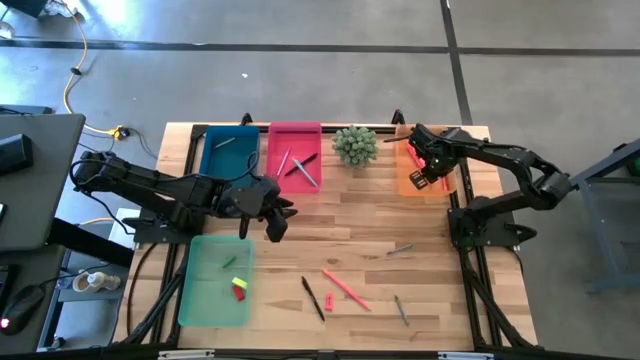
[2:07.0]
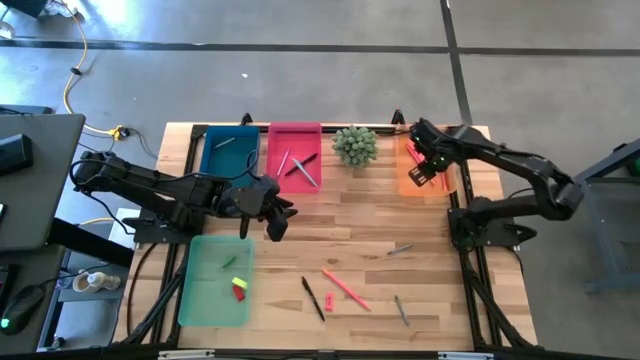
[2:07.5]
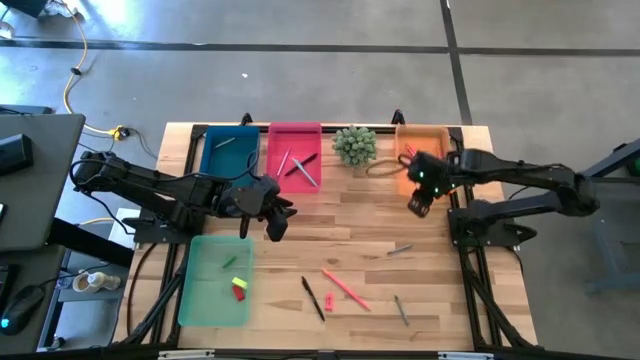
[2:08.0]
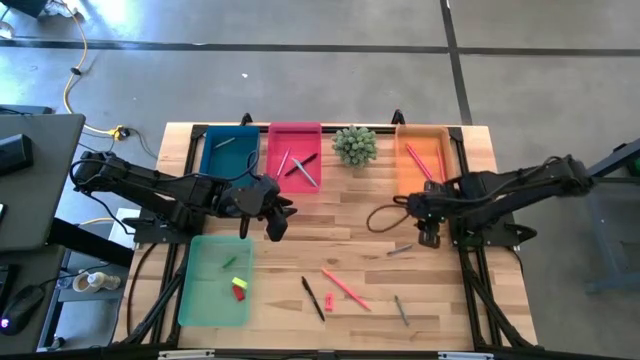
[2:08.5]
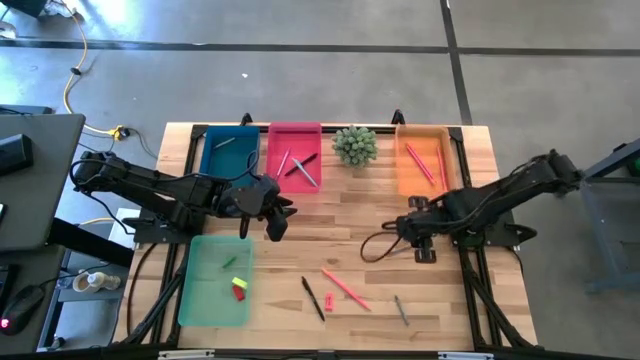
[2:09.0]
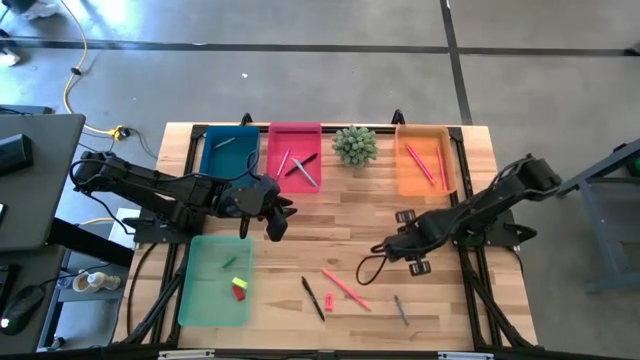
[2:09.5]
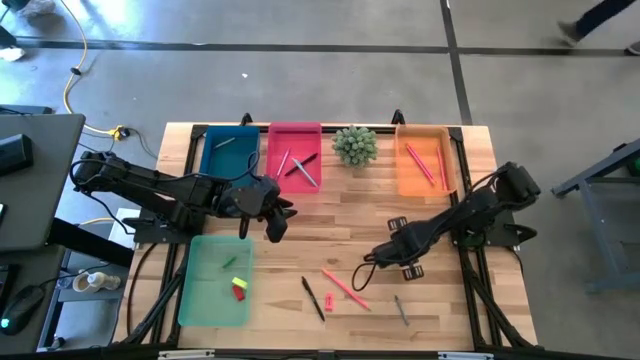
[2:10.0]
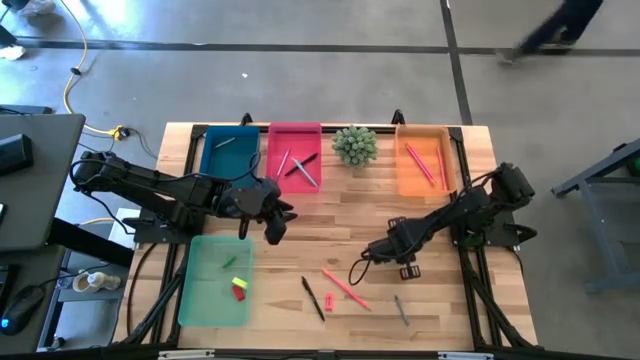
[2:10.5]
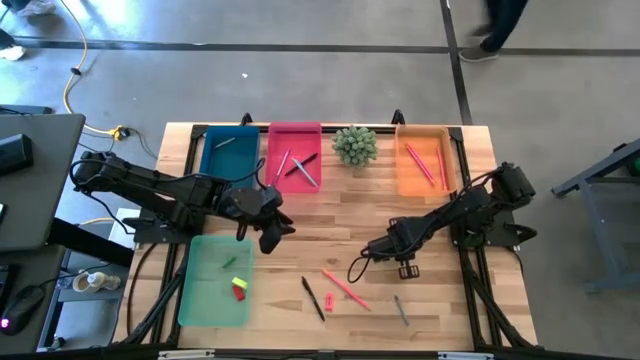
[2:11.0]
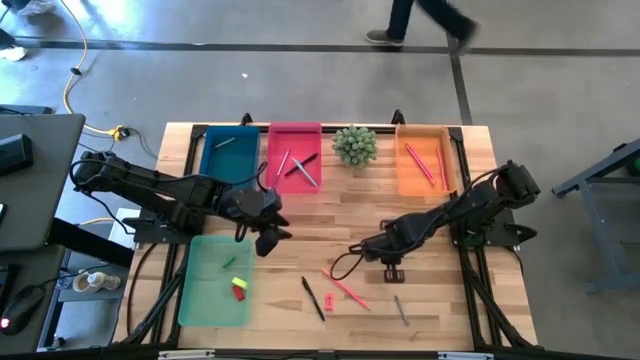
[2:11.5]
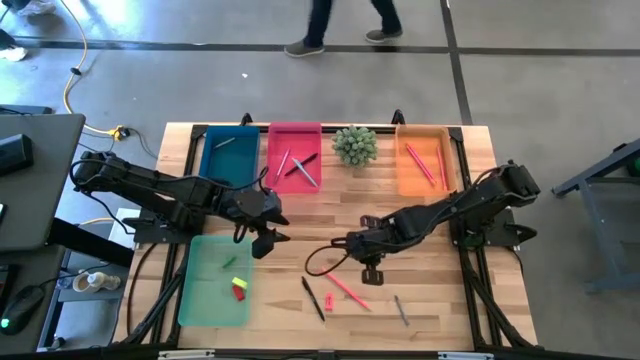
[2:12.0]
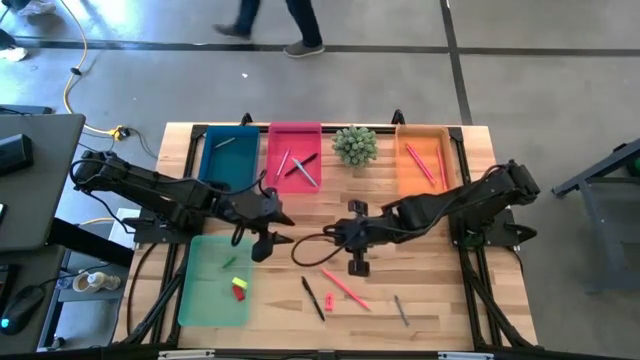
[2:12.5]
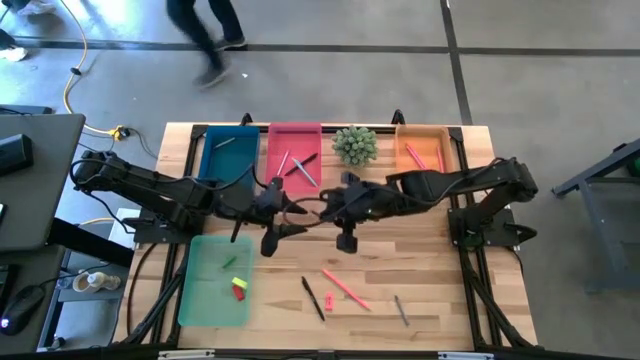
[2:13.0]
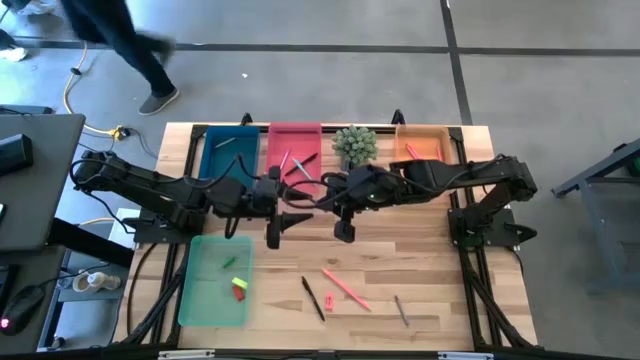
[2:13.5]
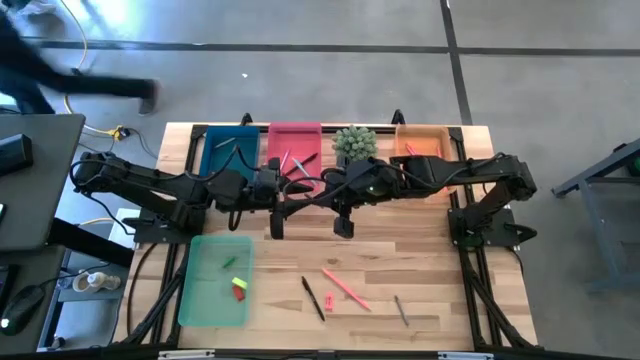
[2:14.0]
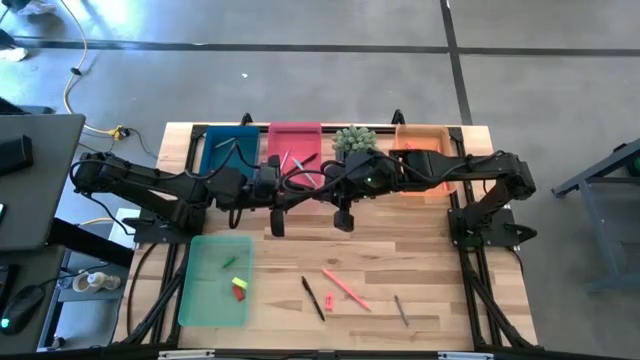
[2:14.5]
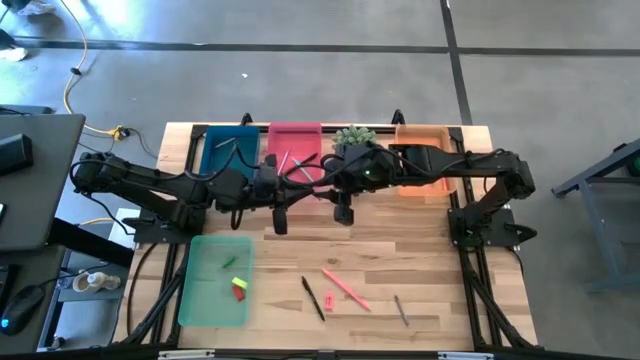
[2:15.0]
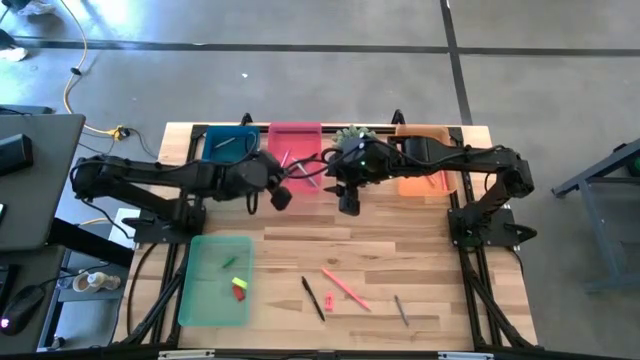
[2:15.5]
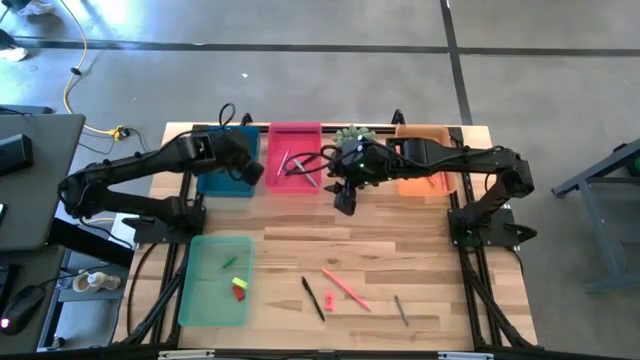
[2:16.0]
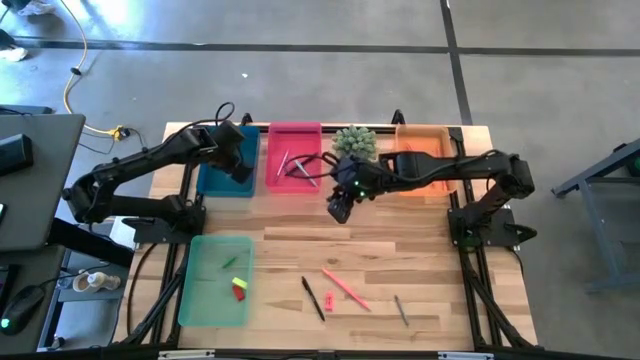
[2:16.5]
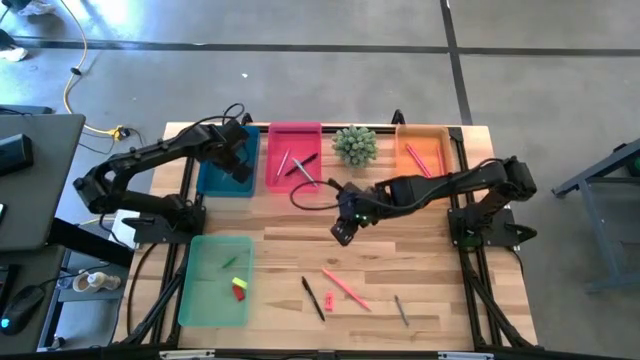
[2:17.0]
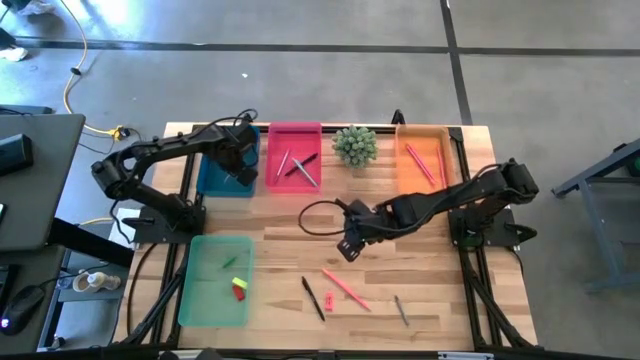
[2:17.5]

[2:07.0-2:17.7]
Task: Sort crayons/erasers/pens/pencils in bins
Put the gray crayon into the blue bin

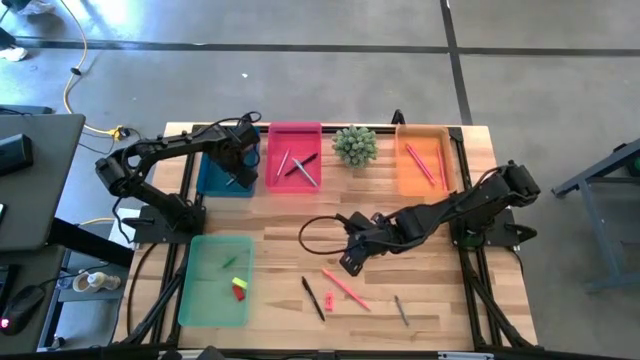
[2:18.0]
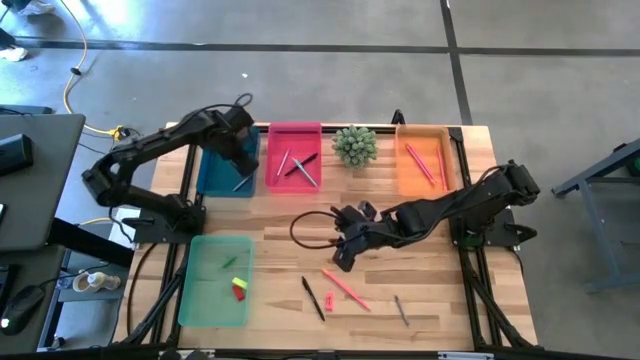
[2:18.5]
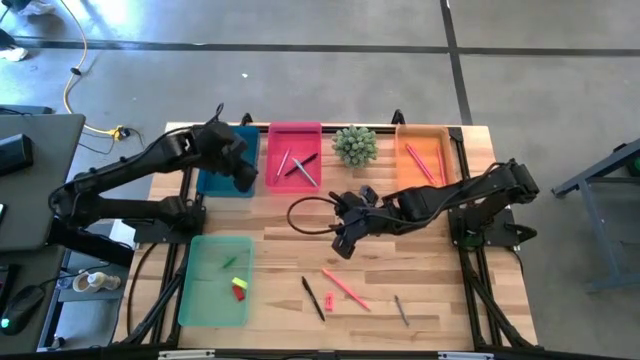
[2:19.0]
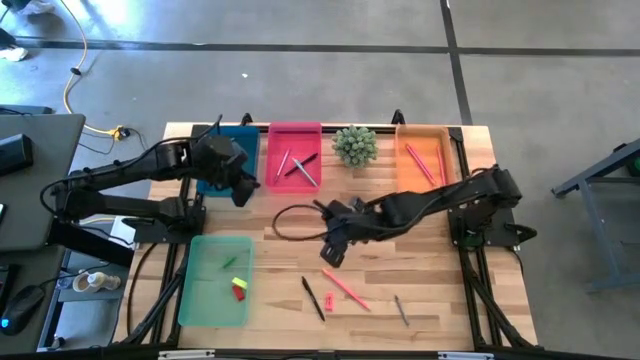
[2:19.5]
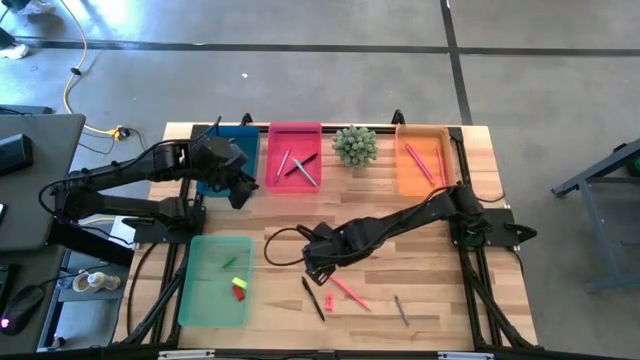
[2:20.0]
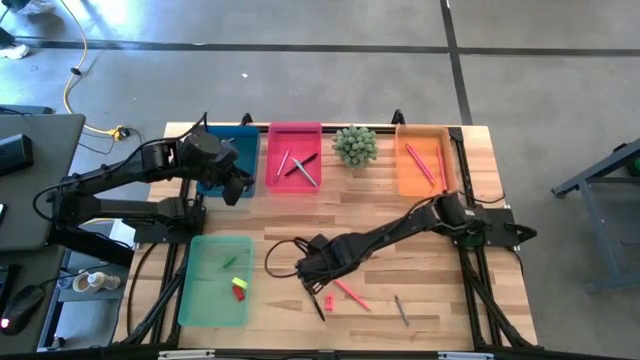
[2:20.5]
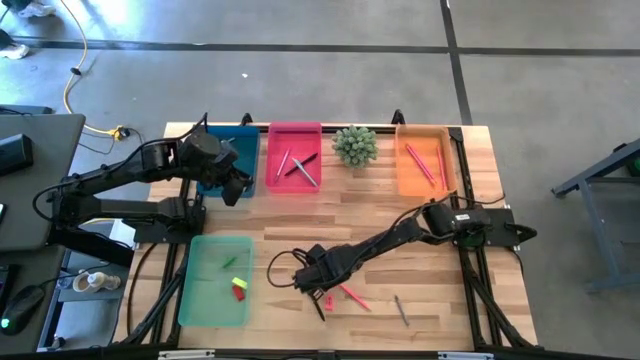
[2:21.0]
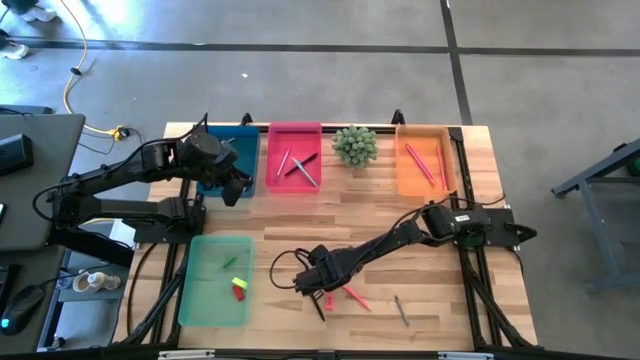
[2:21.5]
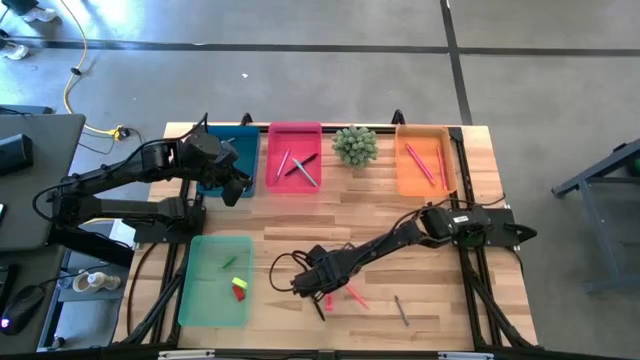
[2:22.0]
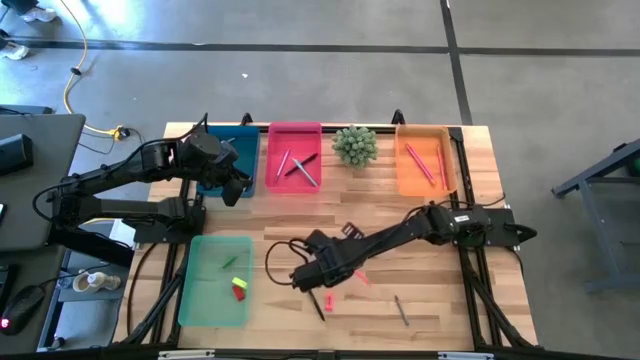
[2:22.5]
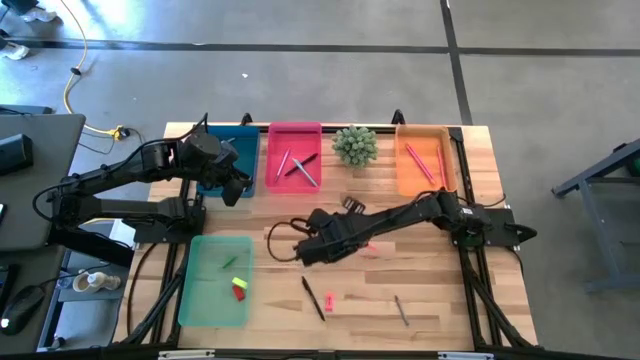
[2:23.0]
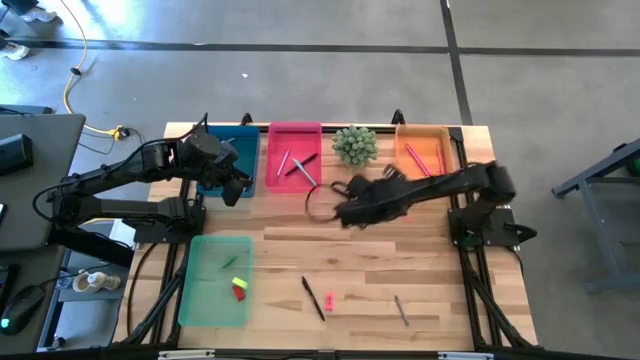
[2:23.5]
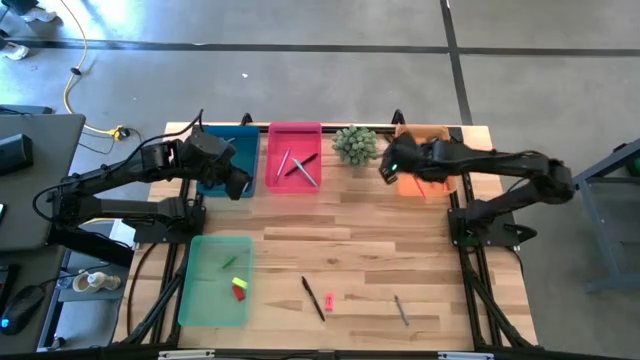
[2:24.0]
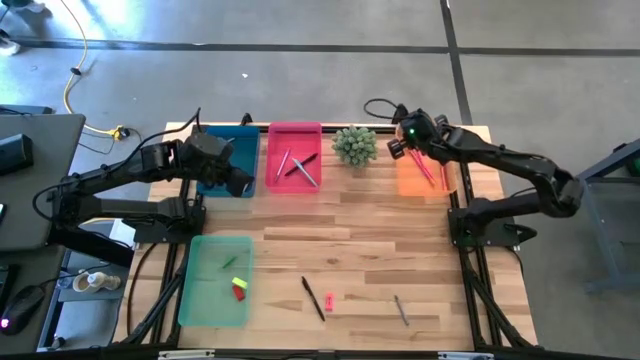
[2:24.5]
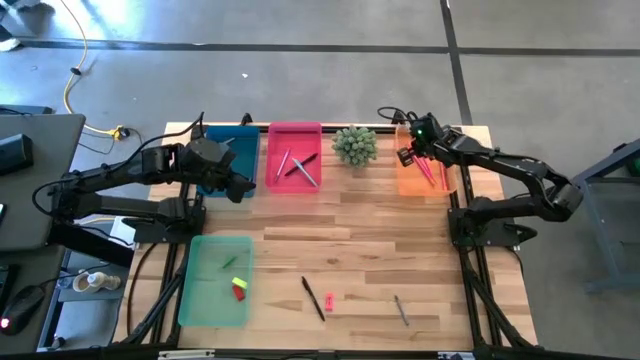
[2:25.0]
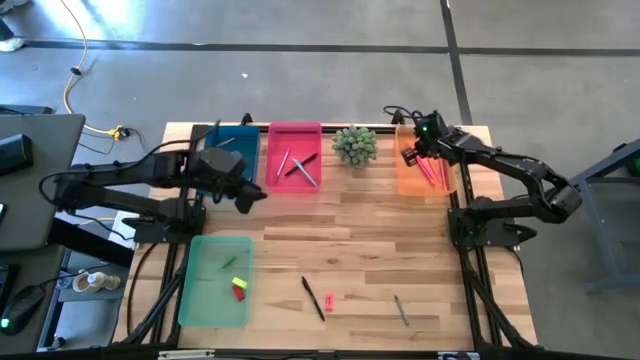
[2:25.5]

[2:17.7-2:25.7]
Put the pink pencil into the orange bin
